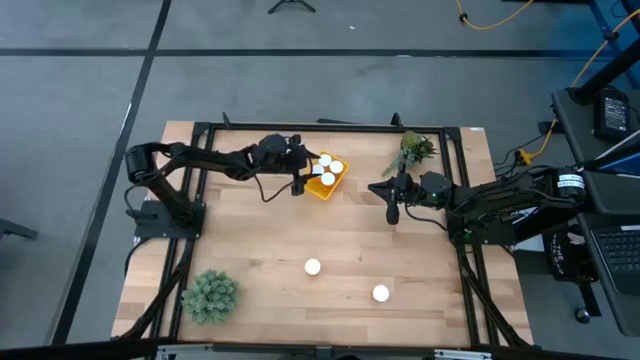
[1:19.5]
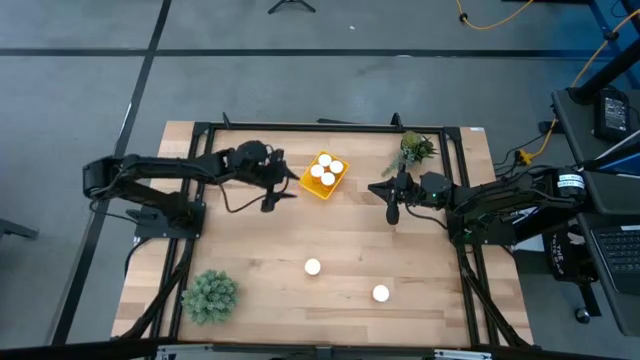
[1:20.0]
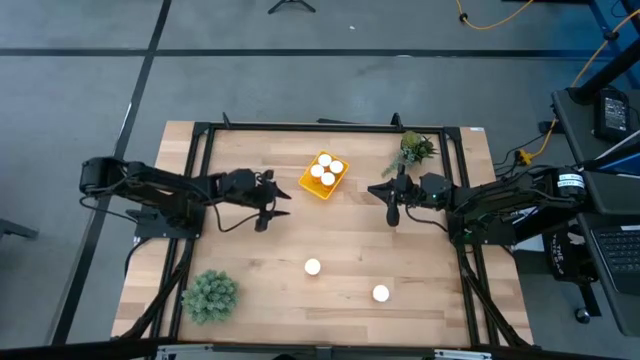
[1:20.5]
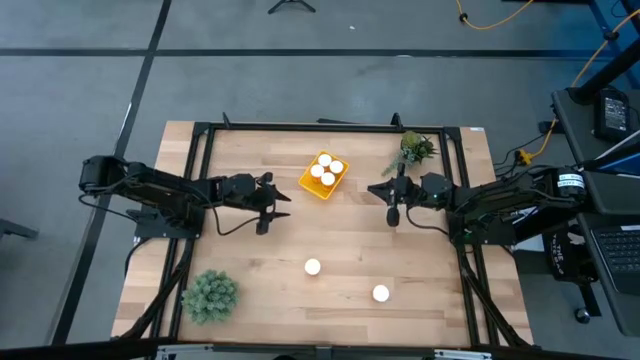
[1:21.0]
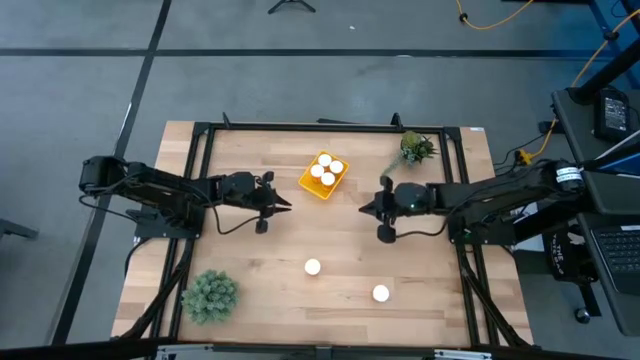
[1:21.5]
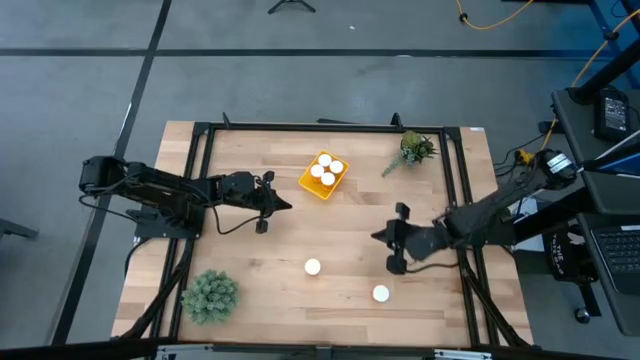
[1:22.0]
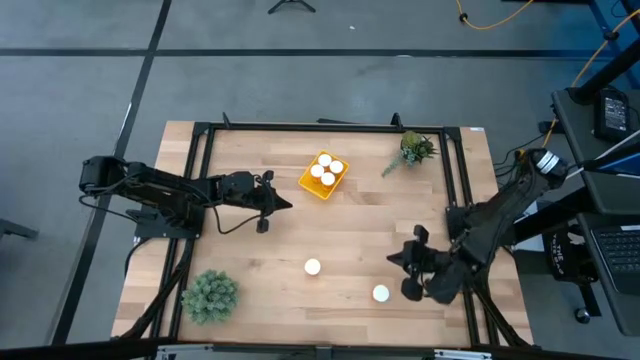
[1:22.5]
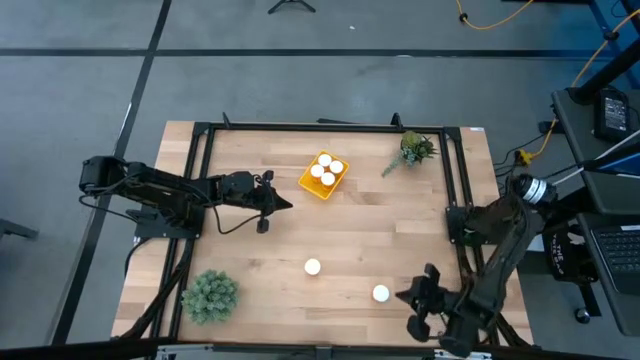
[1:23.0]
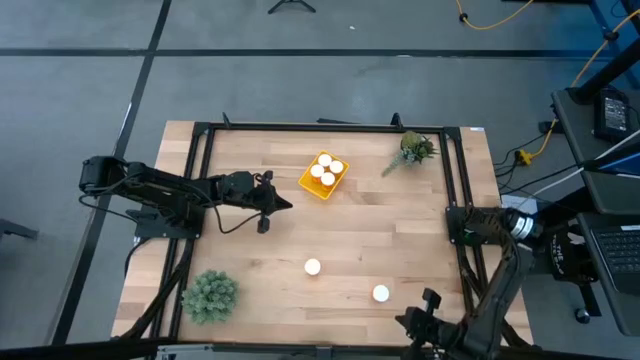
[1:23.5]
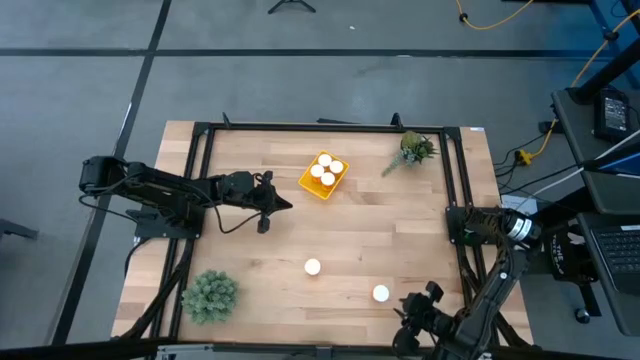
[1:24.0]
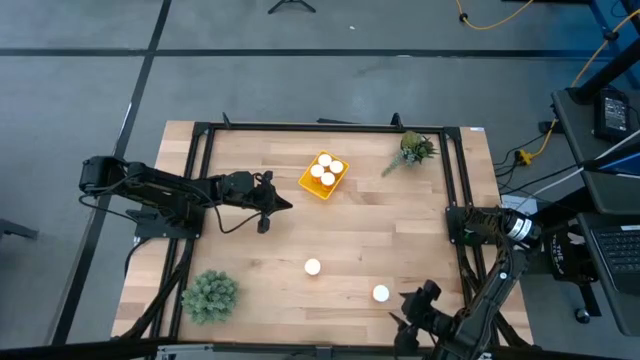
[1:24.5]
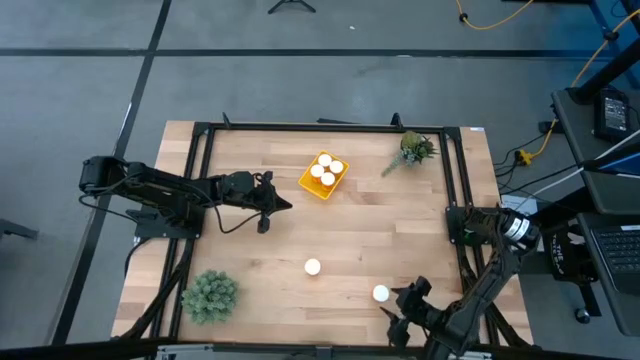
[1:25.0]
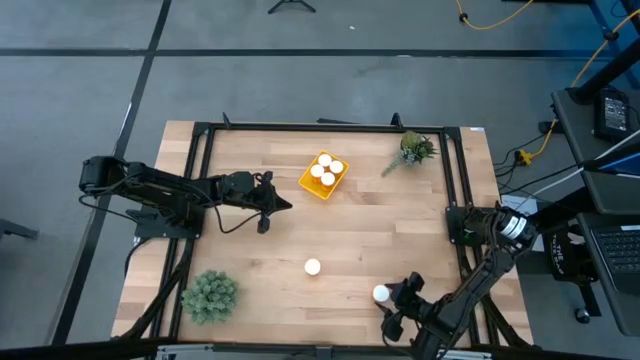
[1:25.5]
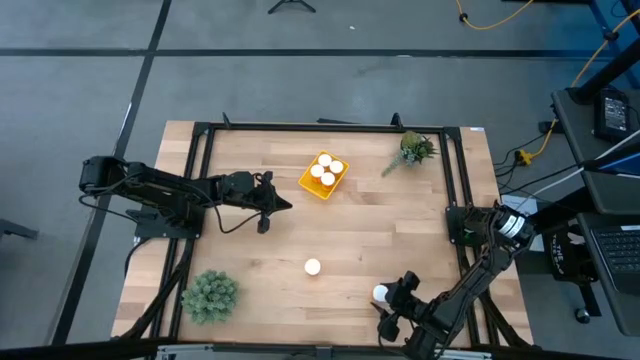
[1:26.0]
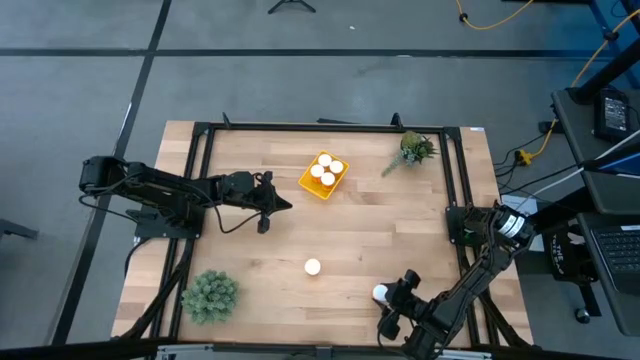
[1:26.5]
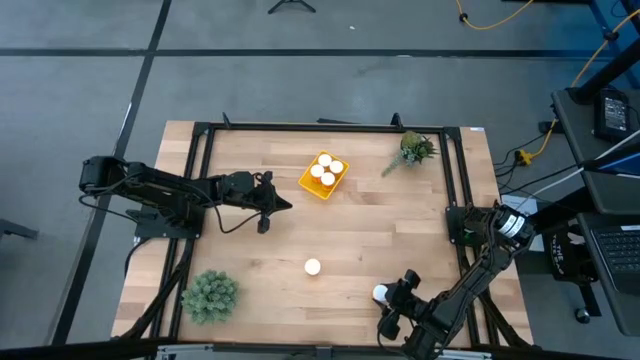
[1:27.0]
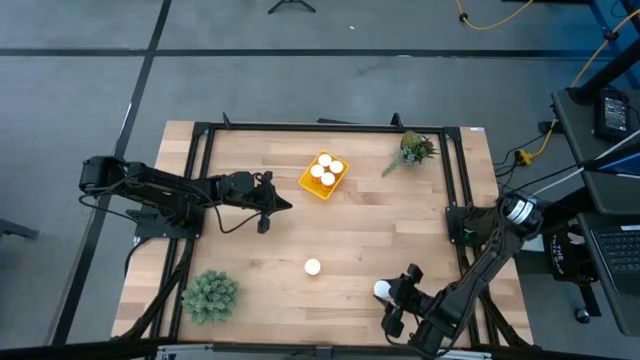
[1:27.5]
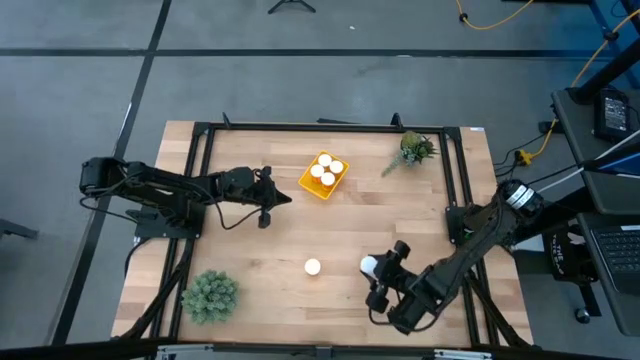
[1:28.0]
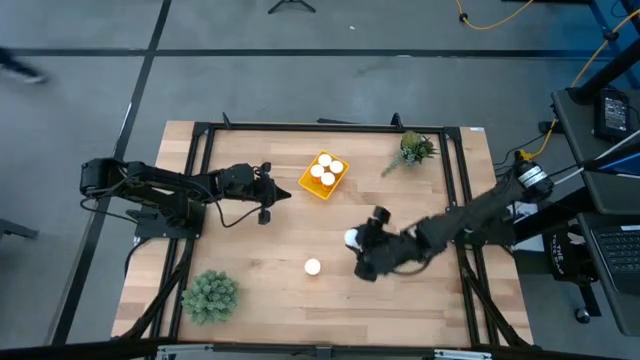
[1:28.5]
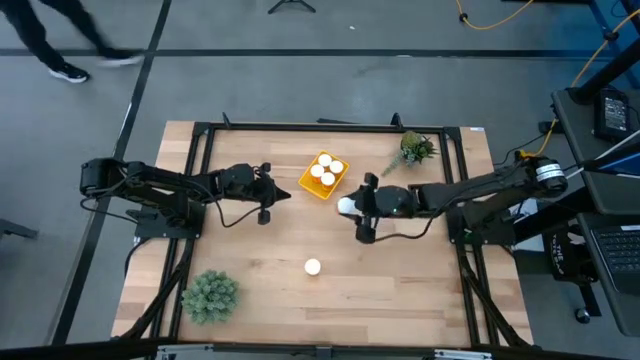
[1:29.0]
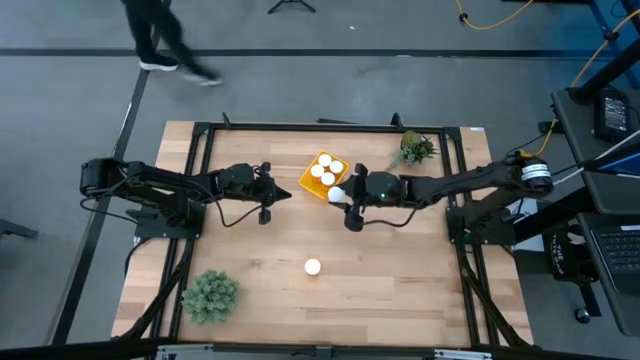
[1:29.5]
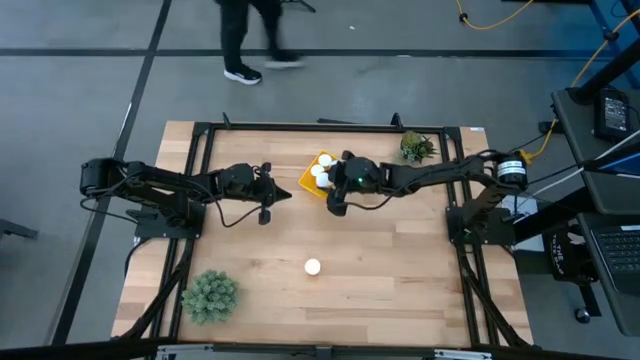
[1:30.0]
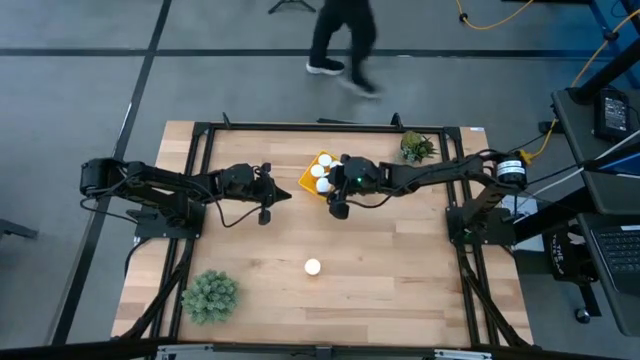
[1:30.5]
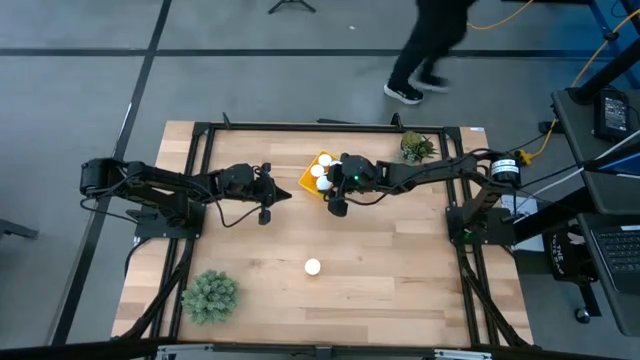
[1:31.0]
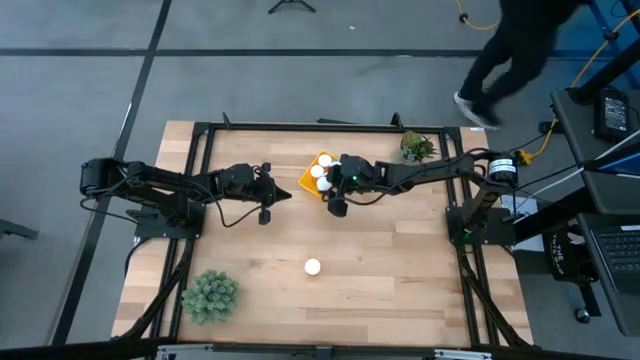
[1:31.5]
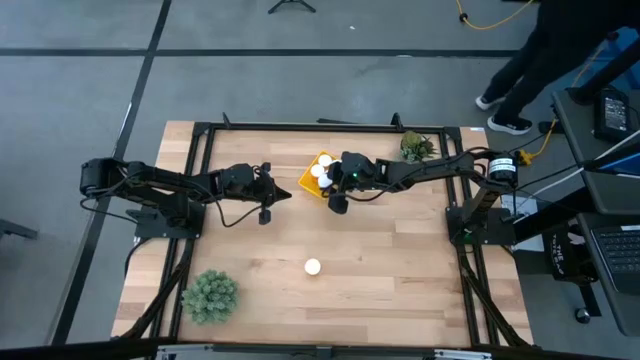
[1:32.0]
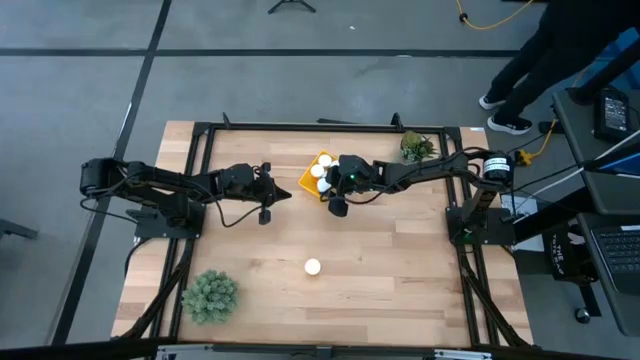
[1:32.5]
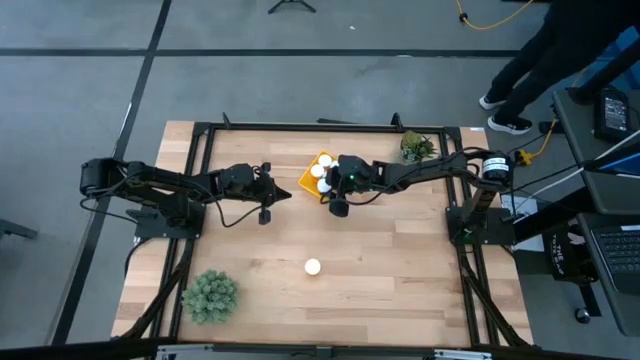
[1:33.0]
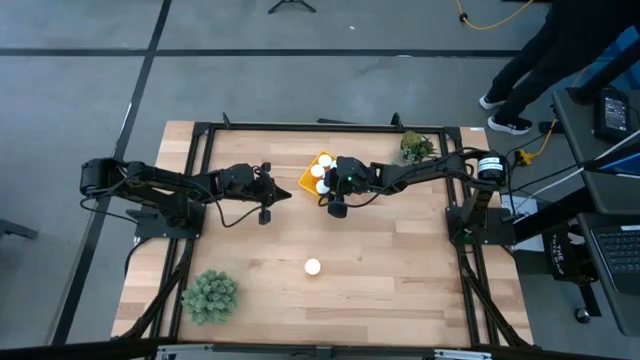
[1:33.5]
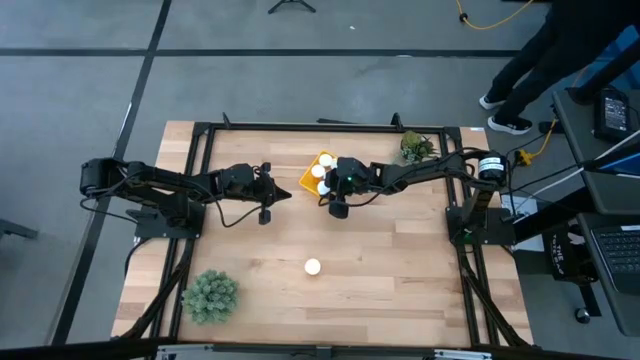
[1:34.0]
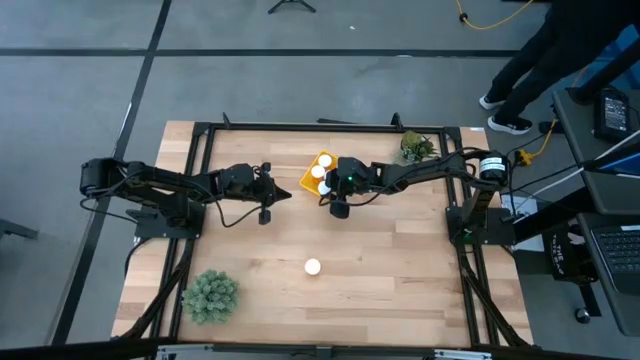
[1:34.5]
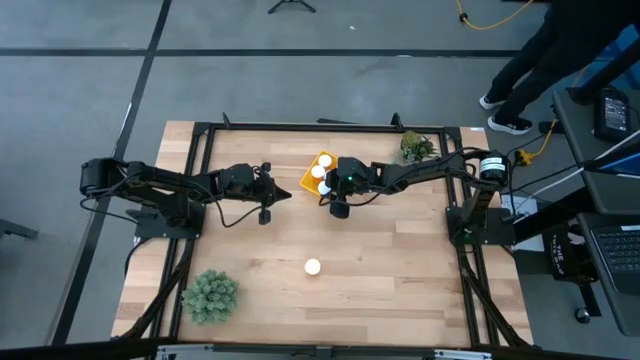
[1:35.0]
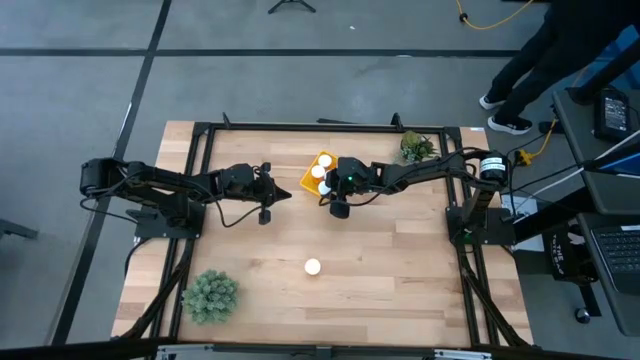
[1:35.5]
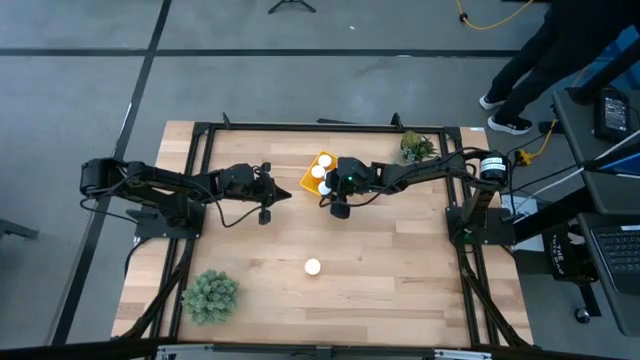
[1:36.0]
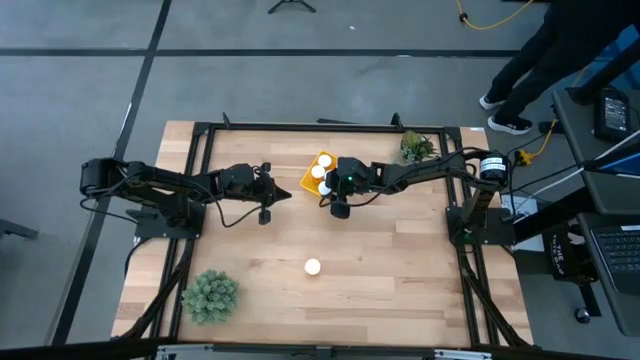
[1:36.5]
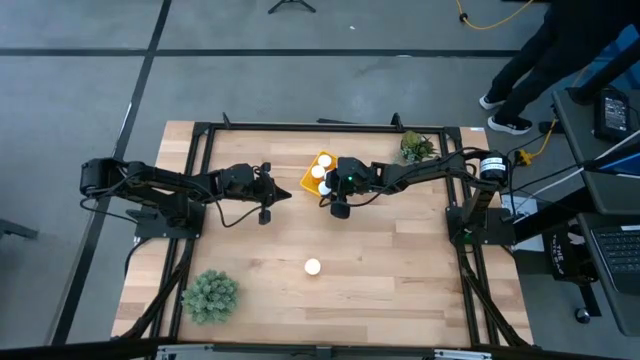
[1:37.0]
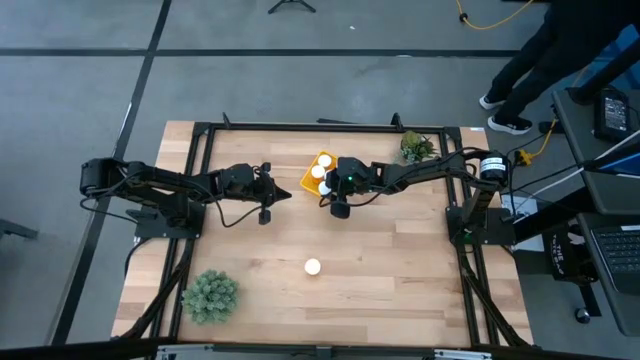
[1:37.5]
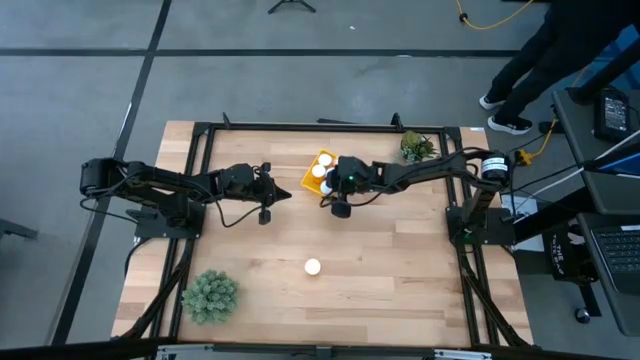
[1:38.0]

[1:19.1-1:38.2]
Task: Pick and place pill bottles into a basket
Put the bottom pill bottle into the bin

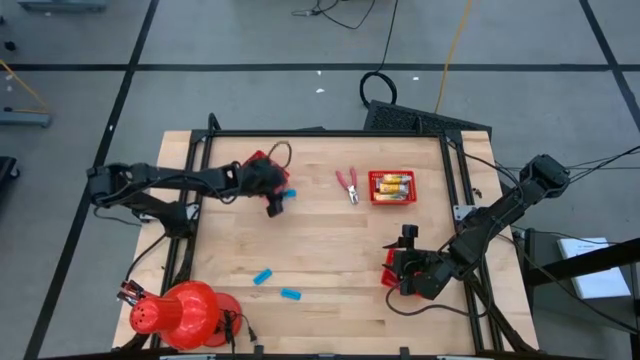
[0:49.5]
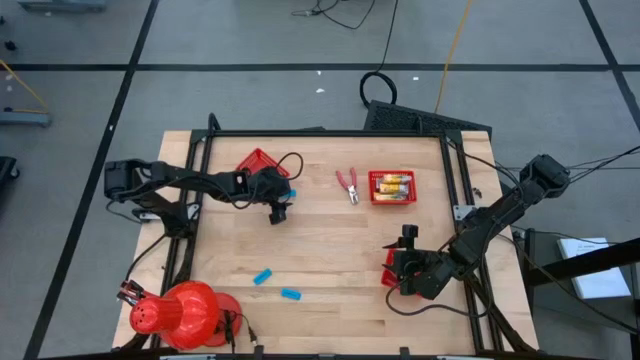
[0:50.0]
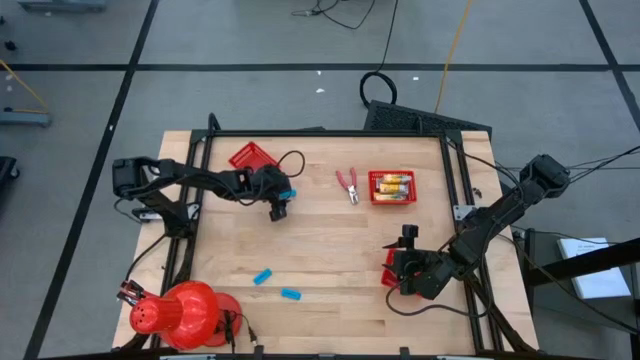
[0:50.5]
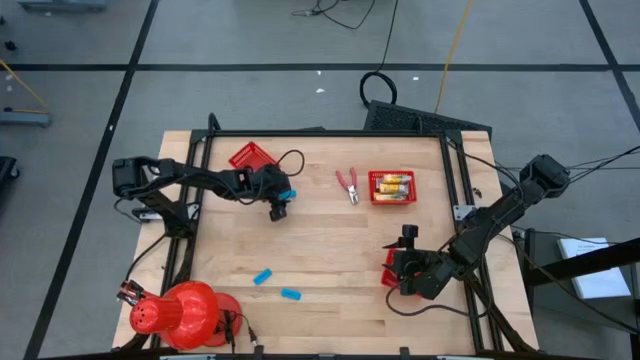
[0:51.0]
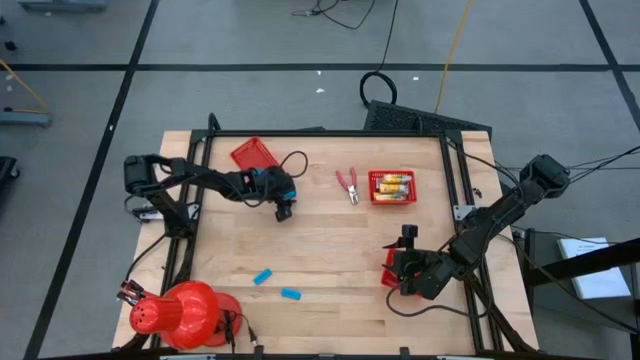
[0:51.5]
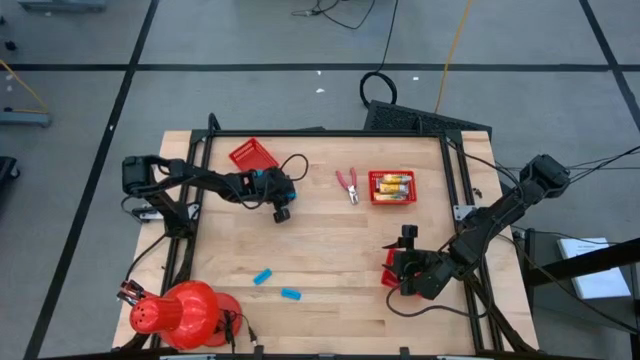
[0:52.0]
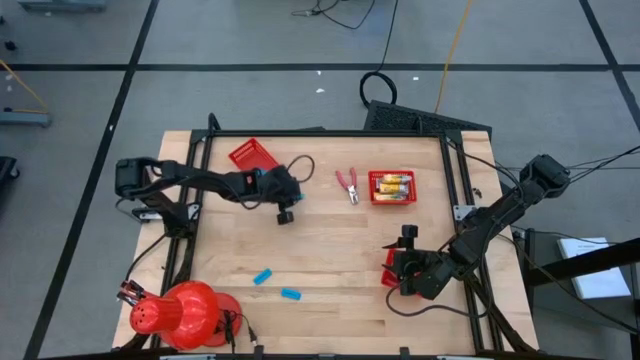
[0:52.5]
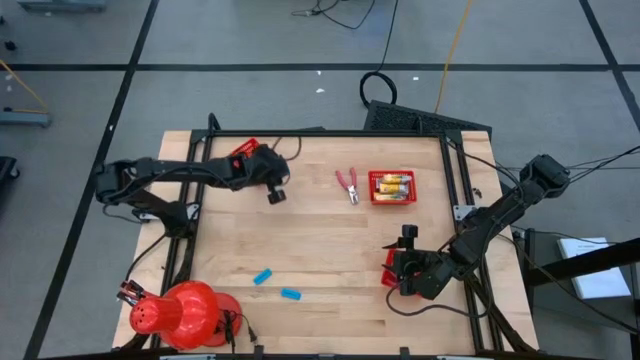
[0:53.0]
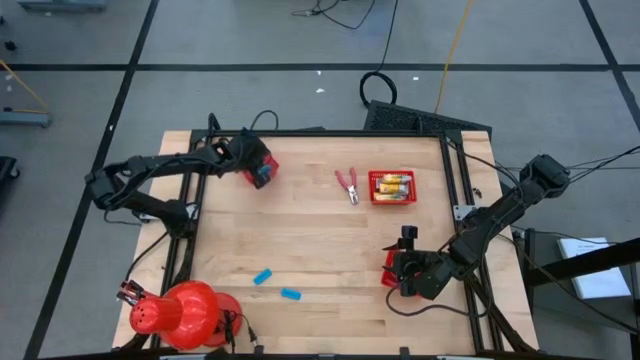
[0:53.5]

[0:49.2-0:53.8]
Task: Pick & Place School Supplies
Put the blue eraser into the top left red bin
